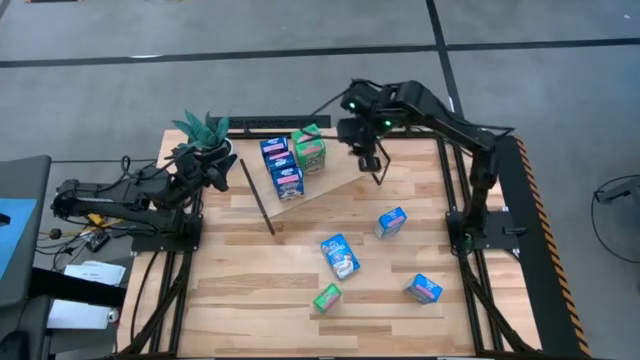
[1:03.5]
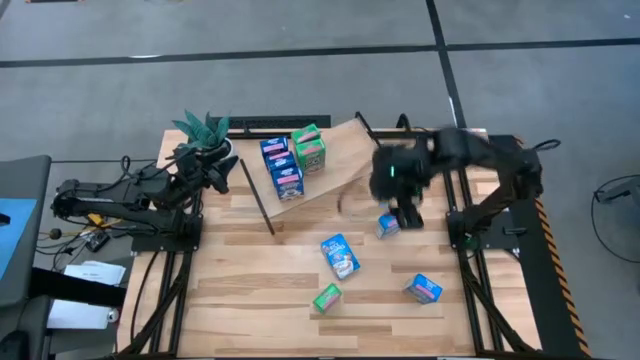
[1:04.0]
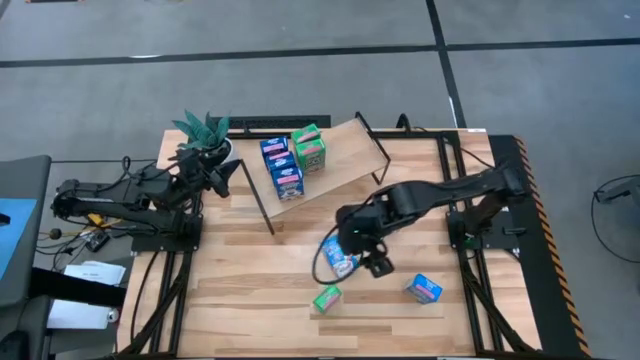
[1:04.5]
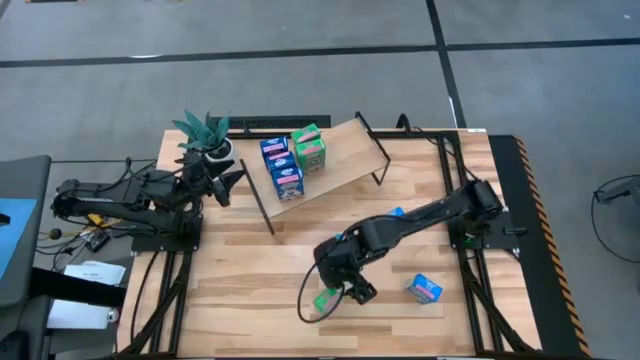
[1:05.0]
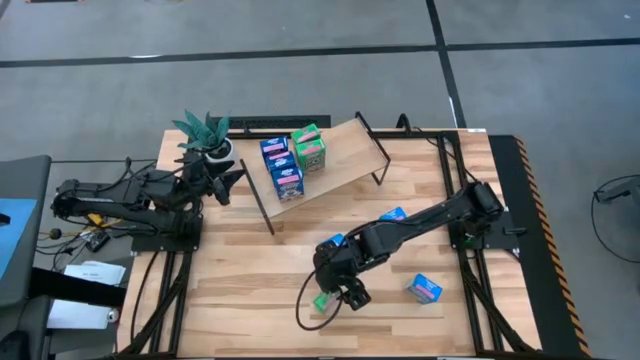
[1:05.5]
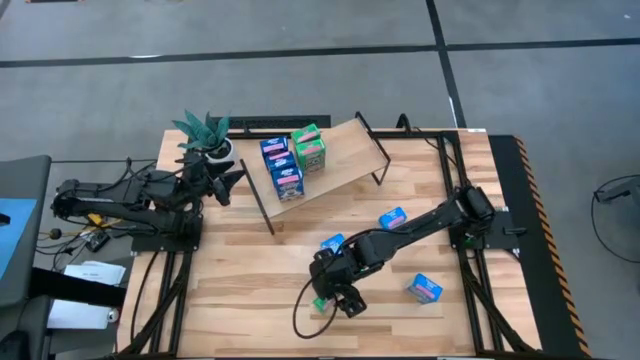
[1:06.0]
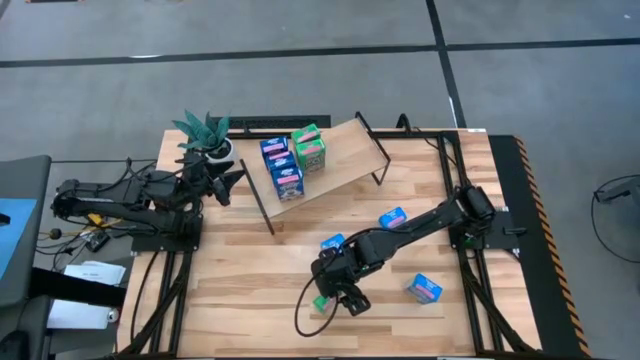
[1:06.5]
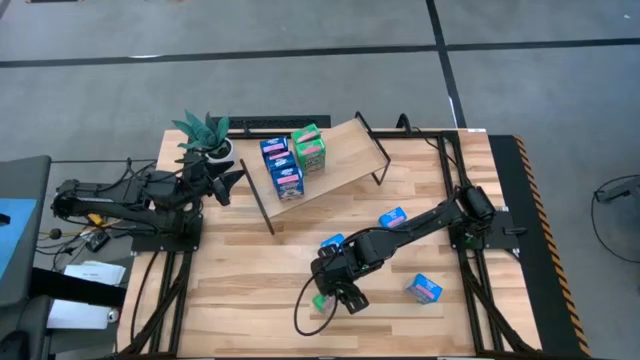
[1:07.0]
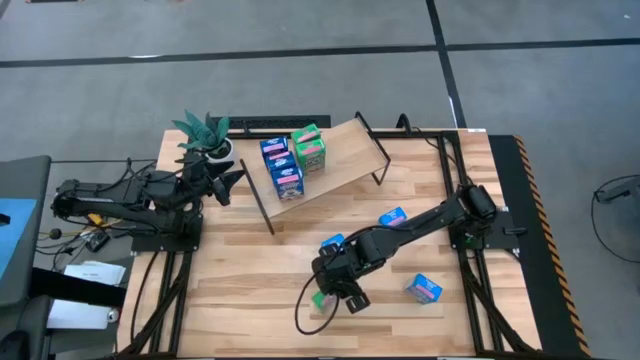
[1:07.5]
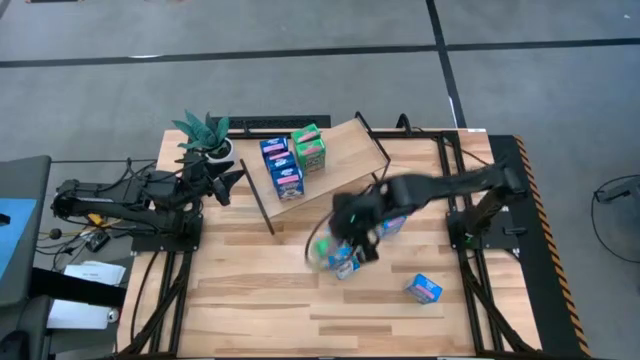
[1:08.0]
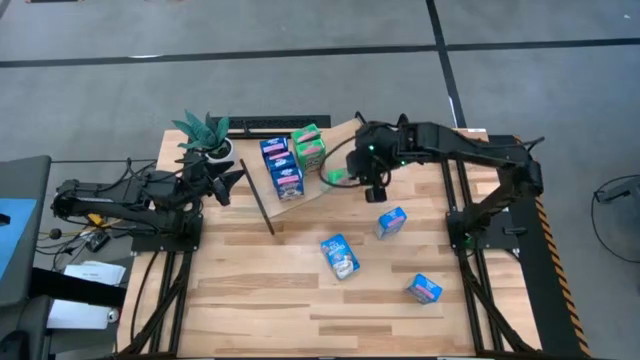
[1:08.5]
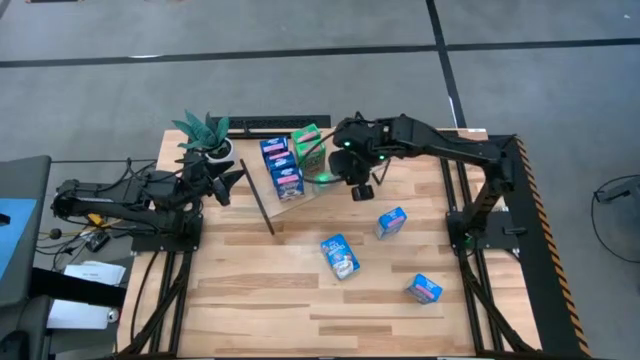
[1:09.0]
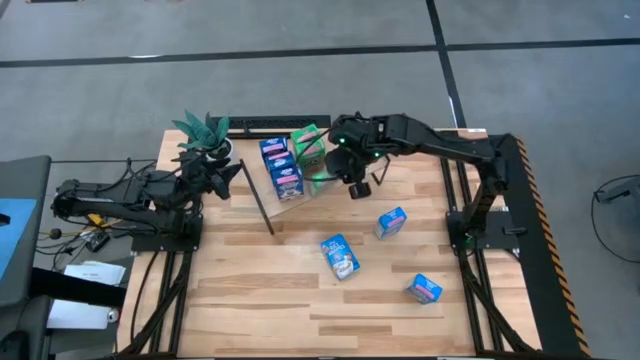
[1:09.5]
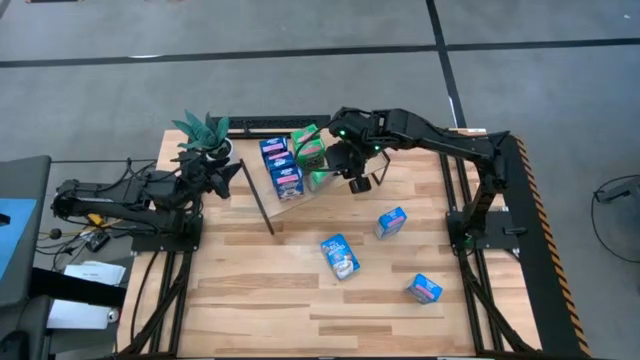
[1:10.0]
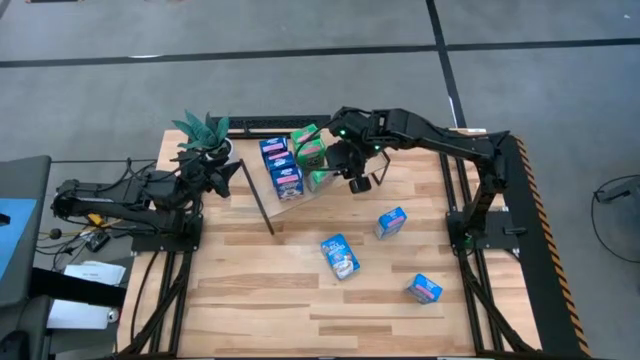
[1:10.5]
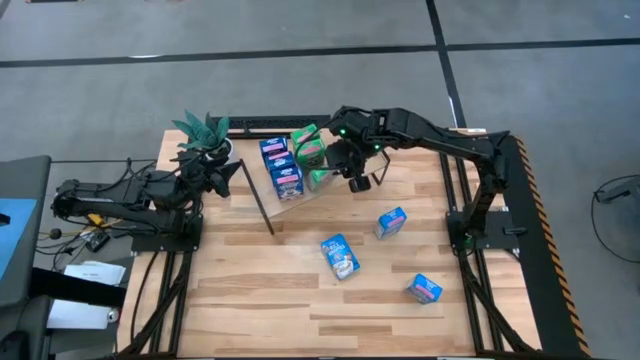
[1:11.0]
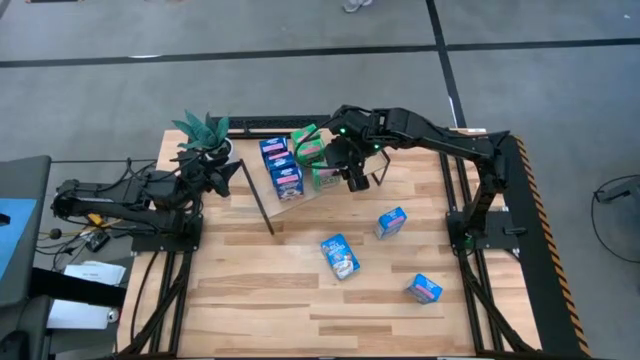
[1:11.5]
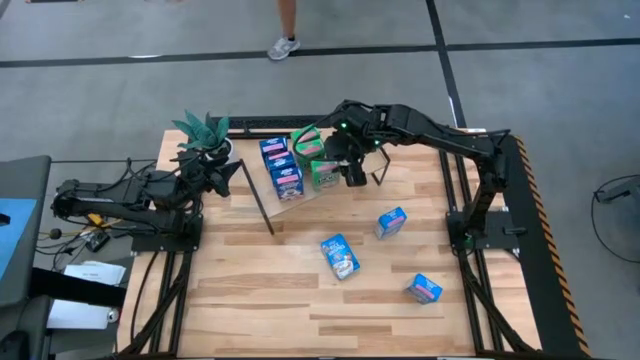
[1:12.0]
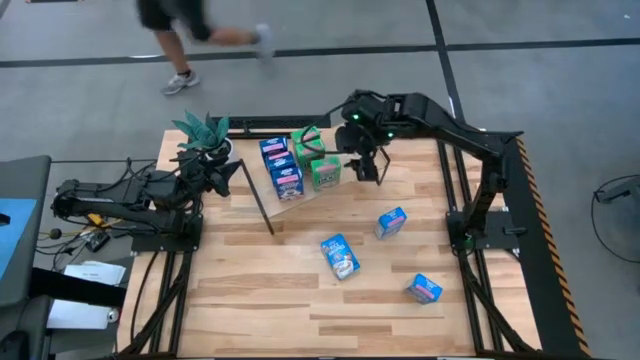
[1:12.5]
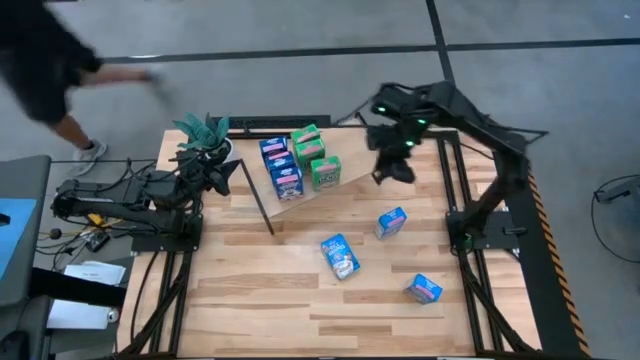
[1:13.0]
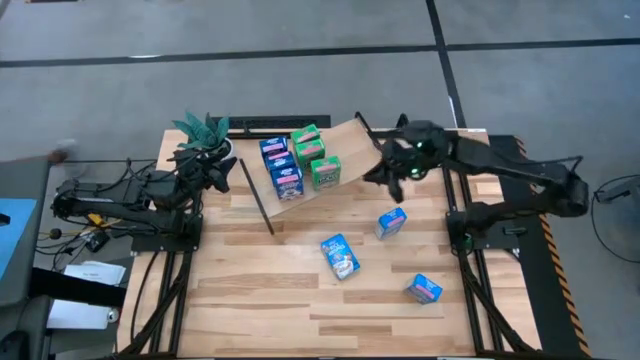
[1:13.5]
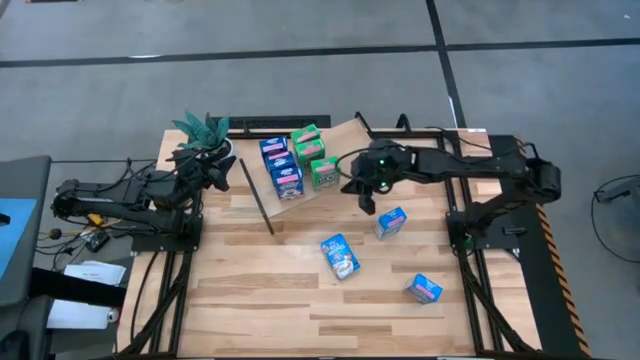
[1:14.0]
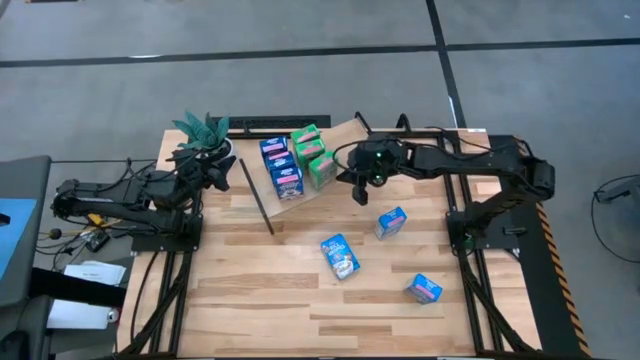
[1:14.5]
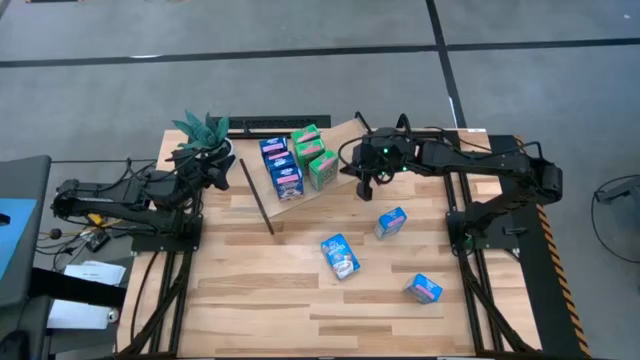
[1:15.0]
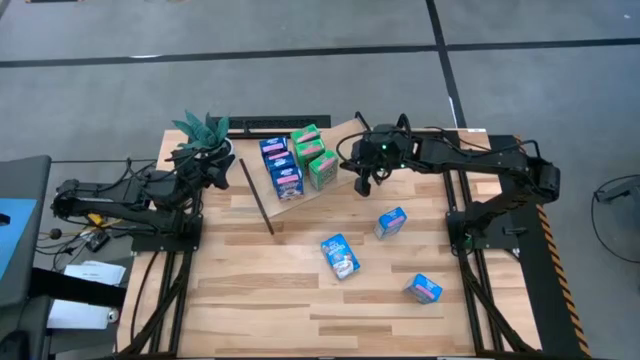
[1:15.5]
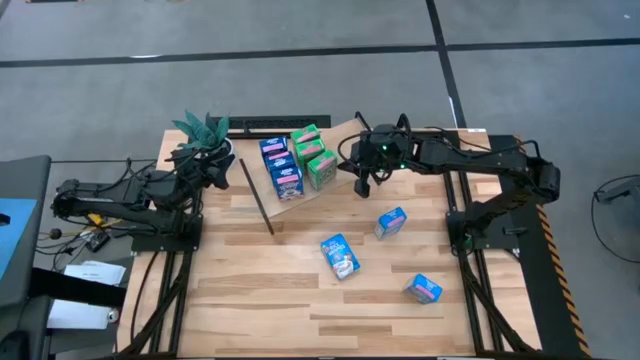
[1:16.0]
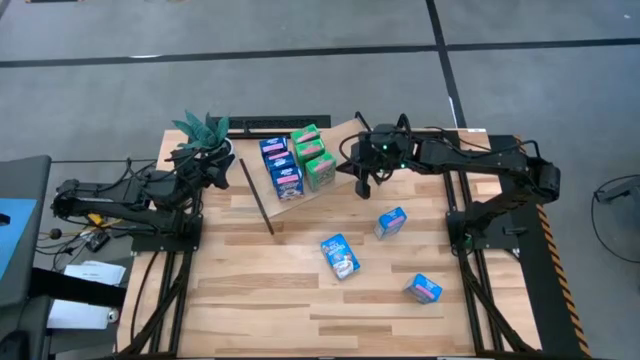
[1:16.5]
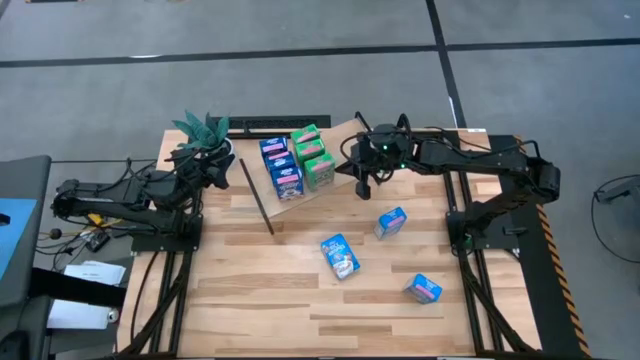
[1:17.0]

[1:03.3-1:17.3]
Task: Stack cereal on shelf
Put the green cereal box on the shelf and align it with the other green cereal boxes

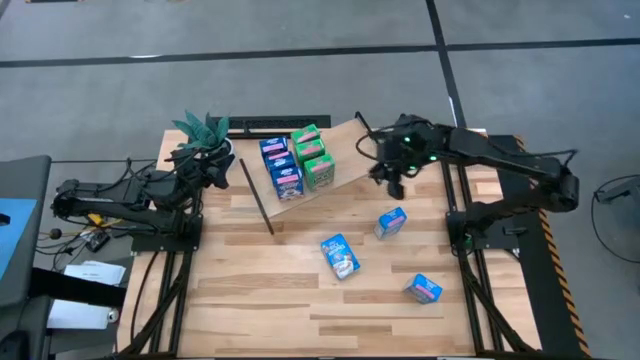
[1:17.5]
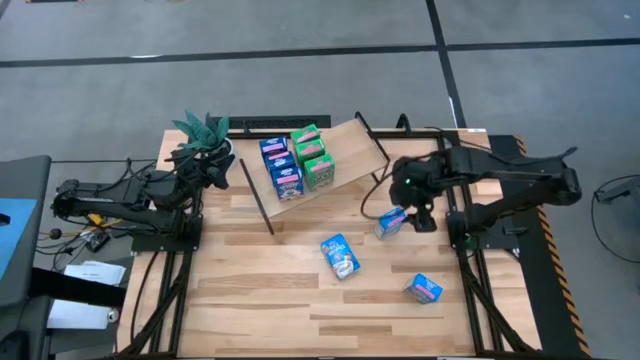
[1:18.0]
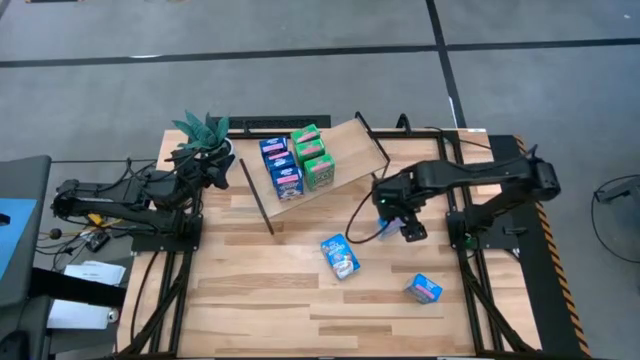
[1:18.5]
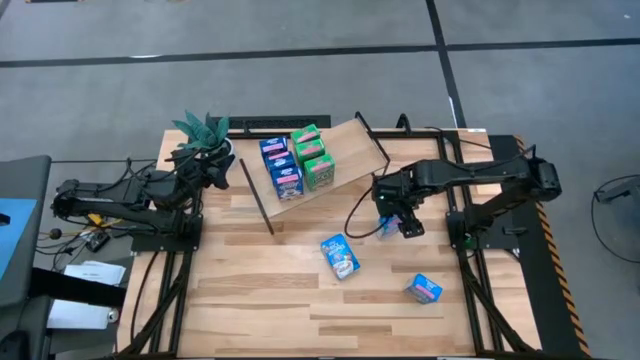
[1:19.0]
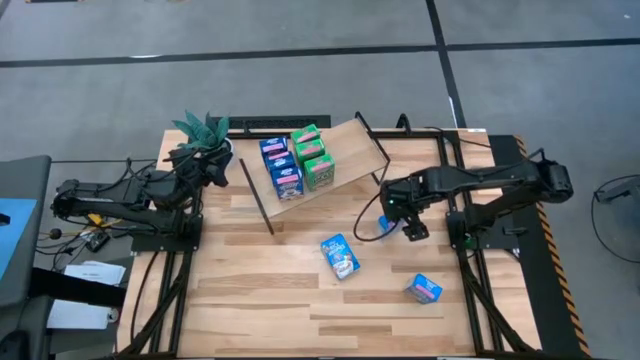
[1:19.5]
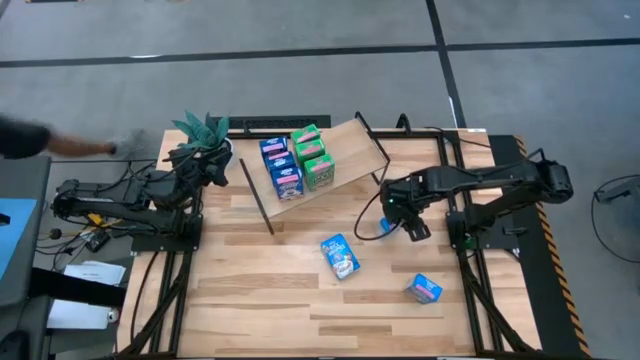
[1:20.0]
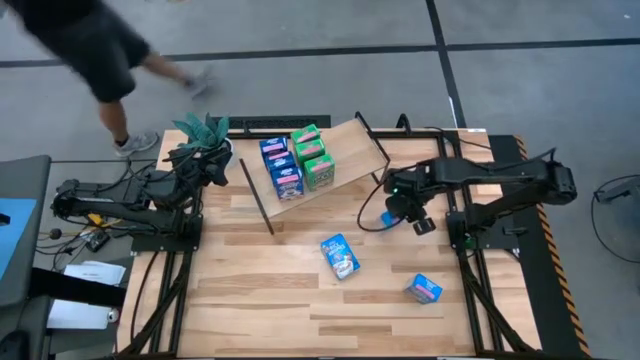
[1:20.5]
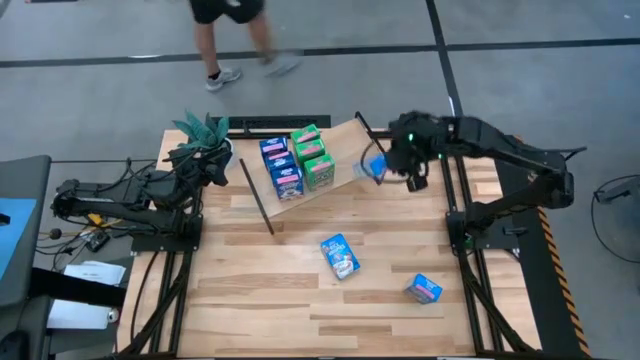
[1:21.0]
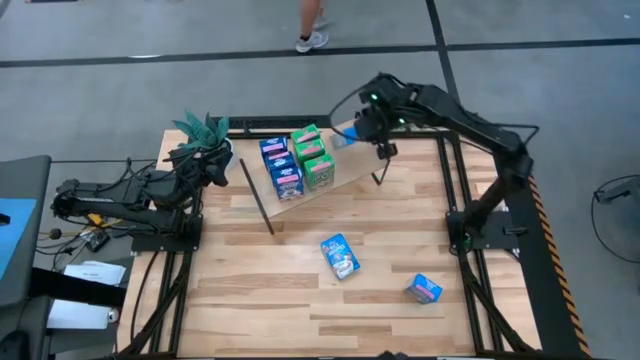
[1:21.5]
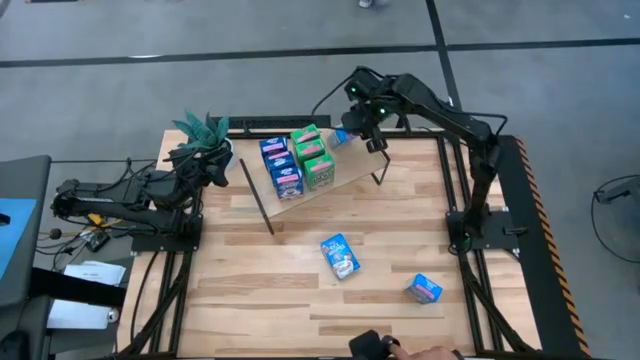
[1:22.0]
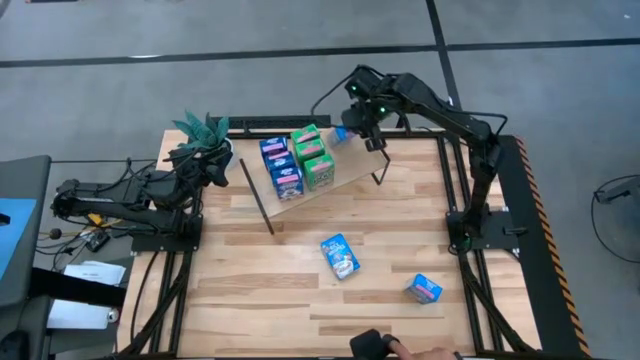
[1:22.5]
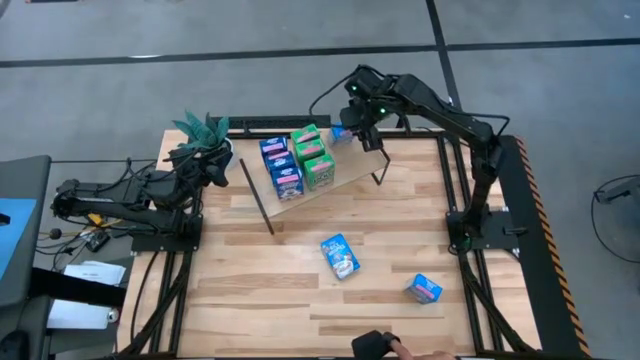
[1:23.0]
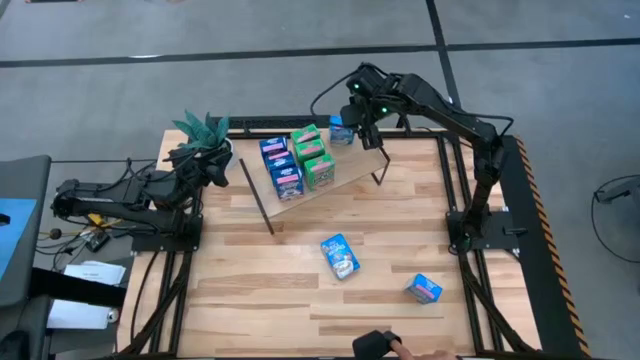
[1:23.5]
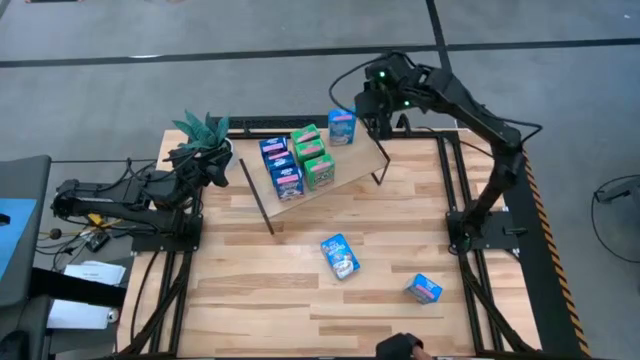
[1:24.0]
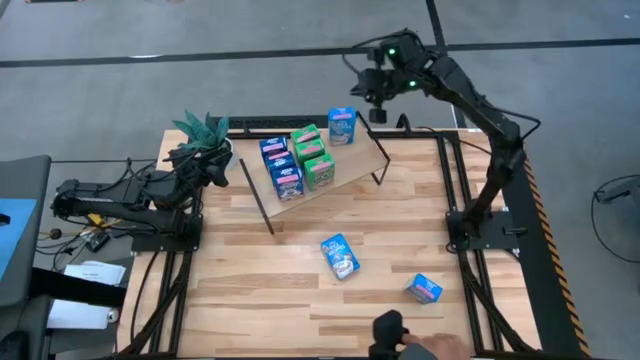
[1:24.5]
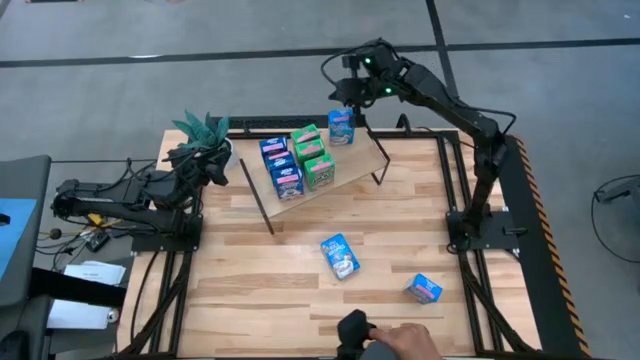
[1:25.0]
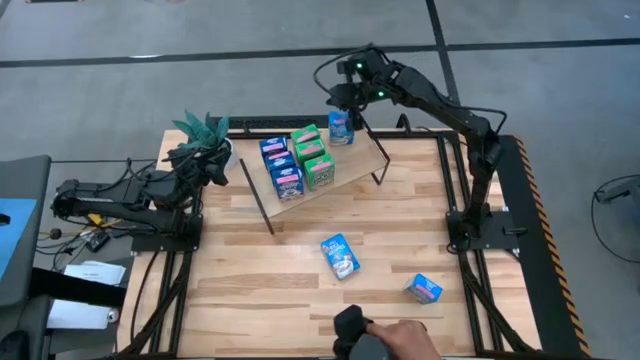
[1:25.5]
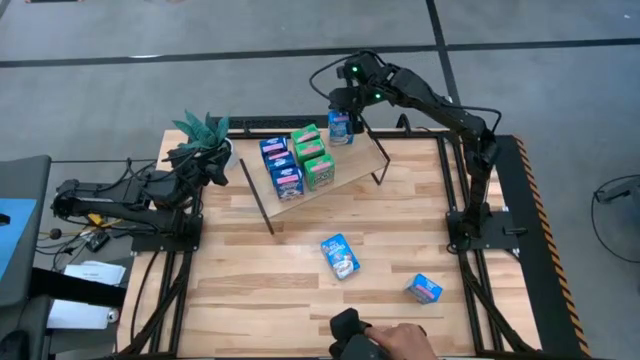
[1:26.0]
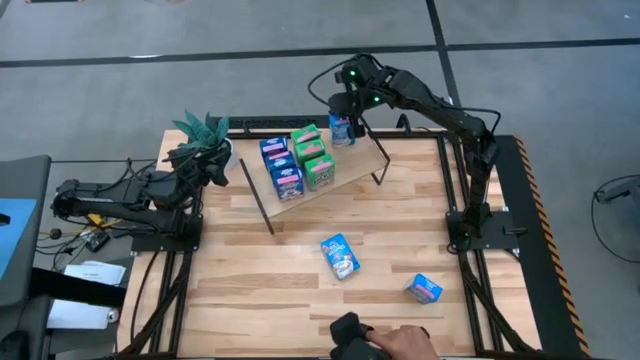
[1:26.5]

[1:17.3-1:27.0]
Put the top right light blue cereal box on the shelf
